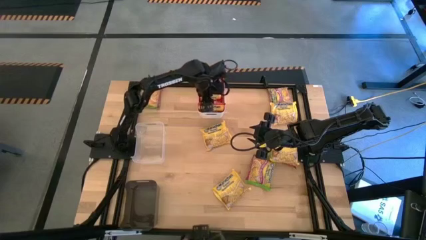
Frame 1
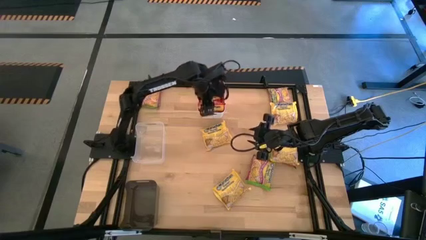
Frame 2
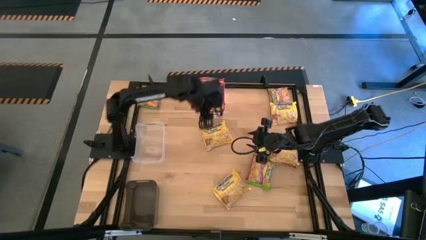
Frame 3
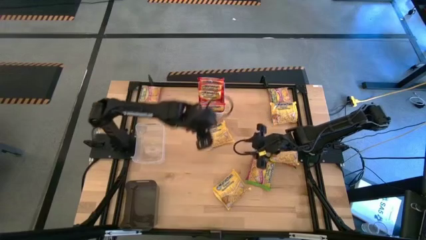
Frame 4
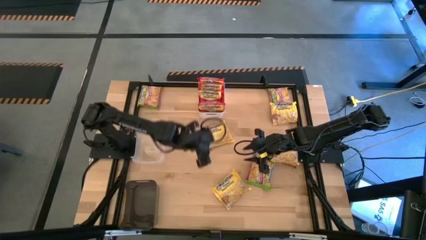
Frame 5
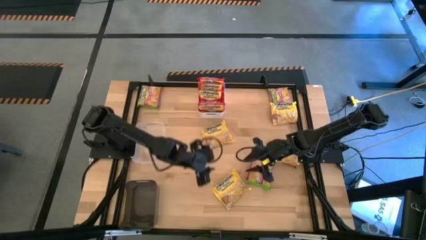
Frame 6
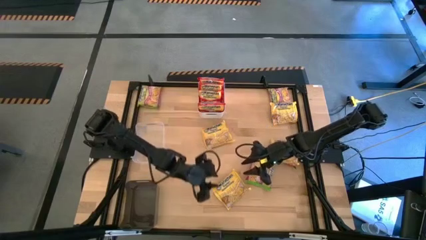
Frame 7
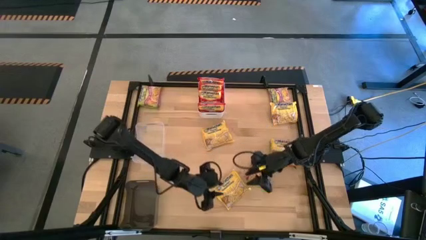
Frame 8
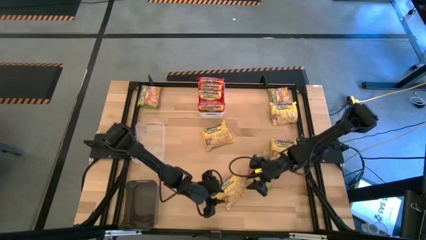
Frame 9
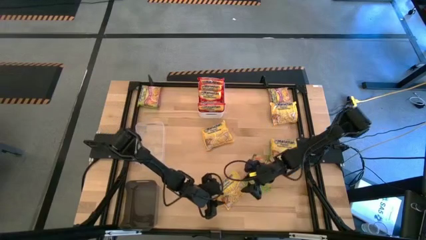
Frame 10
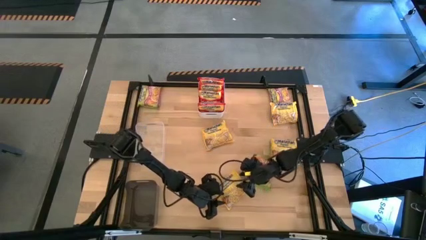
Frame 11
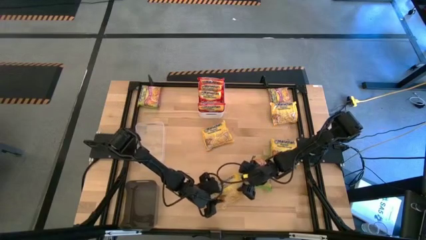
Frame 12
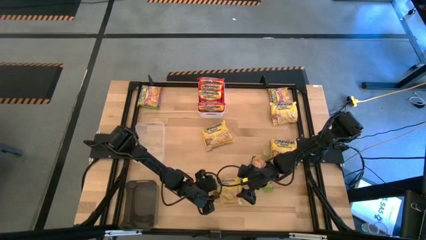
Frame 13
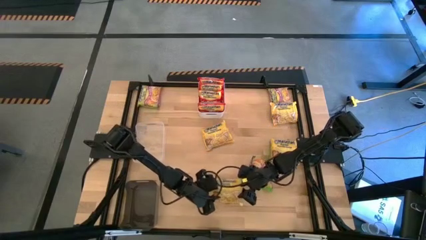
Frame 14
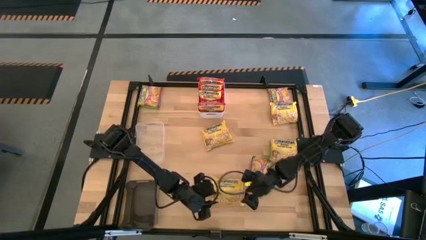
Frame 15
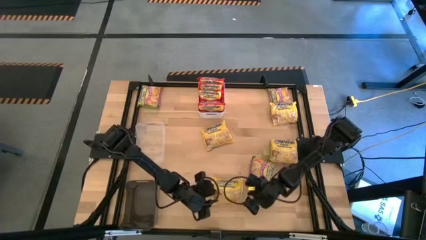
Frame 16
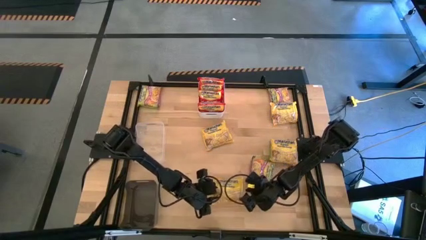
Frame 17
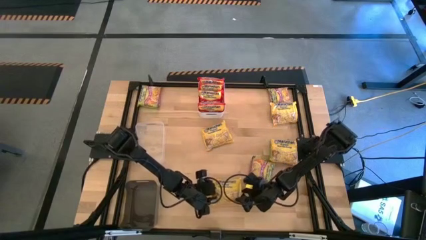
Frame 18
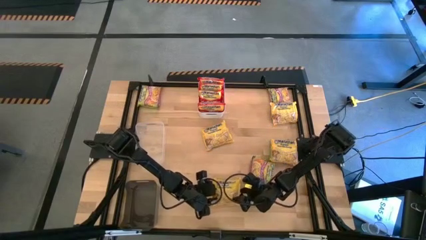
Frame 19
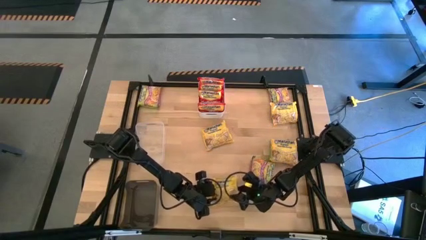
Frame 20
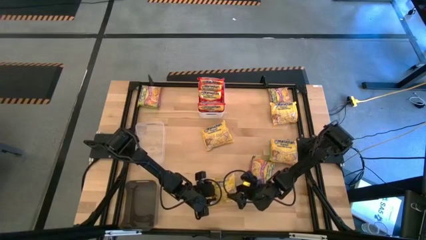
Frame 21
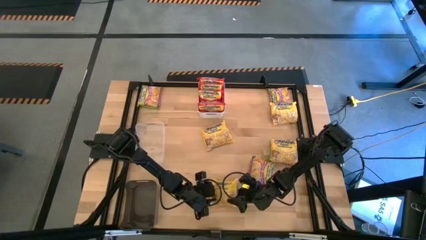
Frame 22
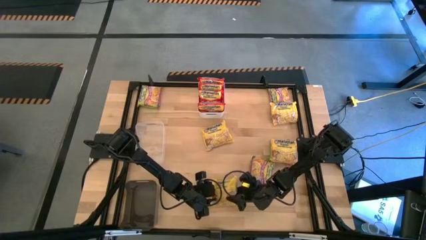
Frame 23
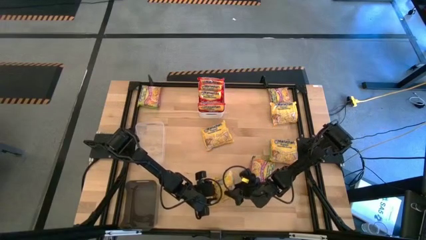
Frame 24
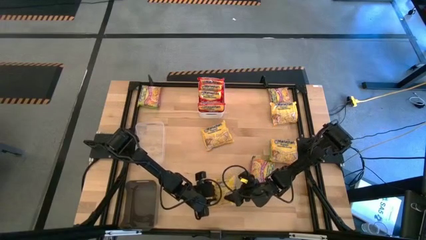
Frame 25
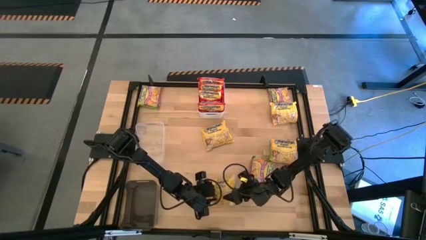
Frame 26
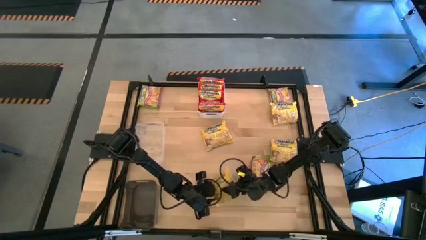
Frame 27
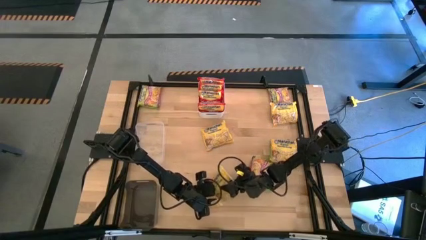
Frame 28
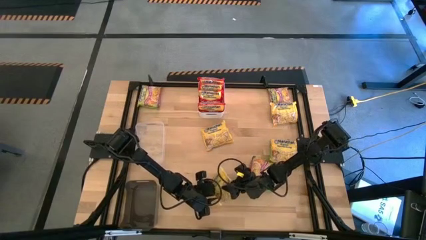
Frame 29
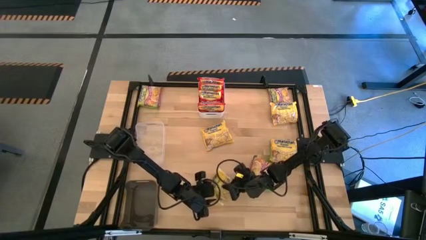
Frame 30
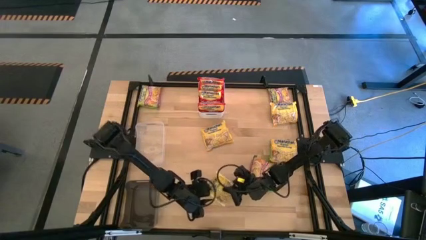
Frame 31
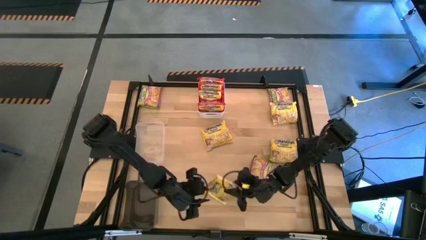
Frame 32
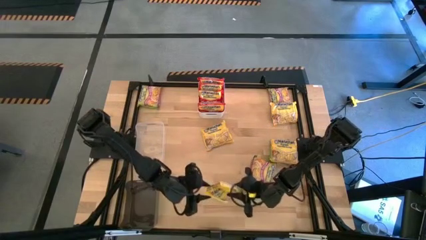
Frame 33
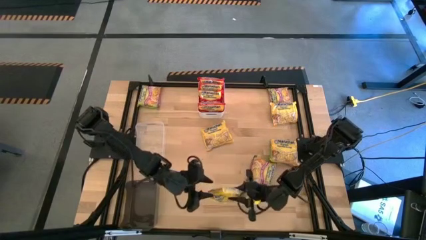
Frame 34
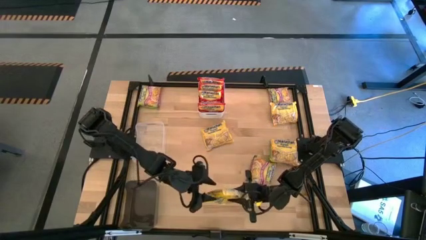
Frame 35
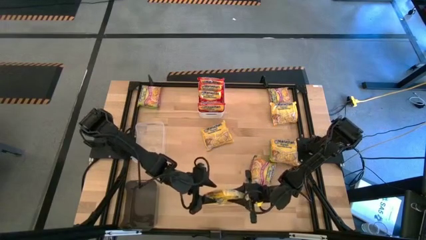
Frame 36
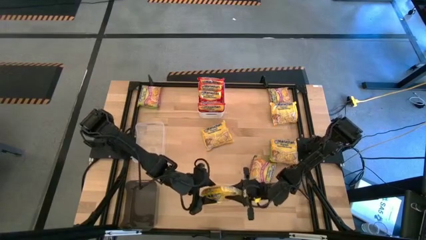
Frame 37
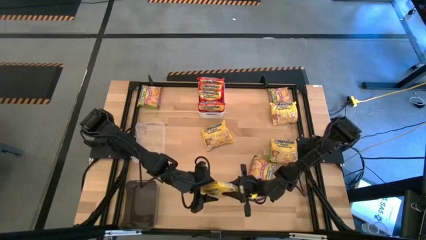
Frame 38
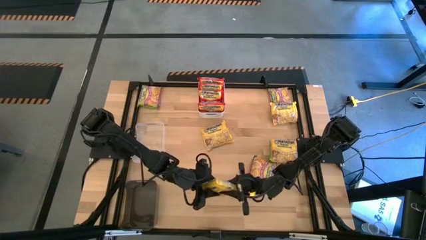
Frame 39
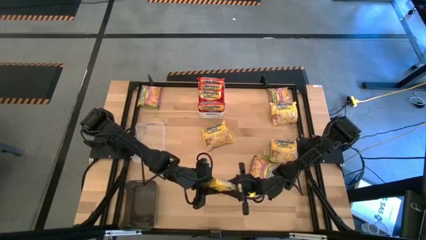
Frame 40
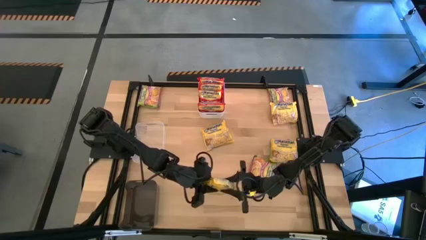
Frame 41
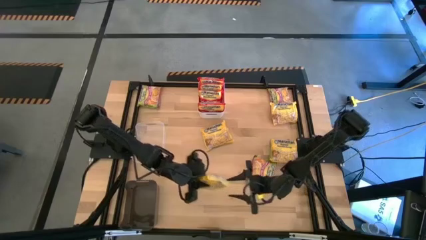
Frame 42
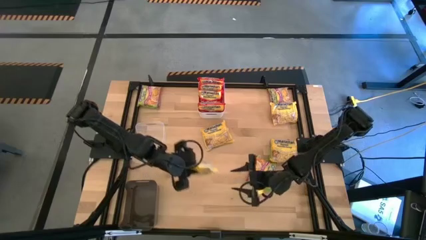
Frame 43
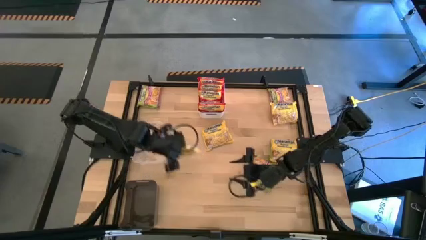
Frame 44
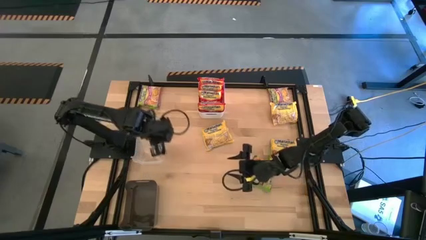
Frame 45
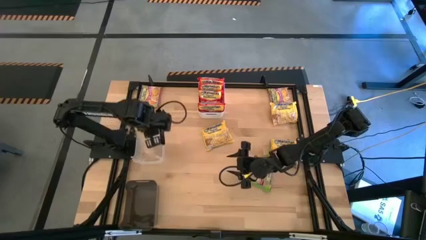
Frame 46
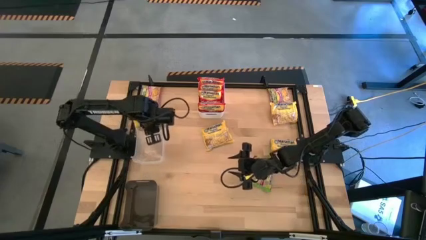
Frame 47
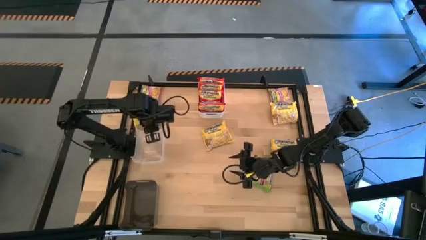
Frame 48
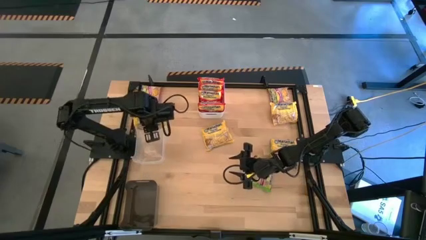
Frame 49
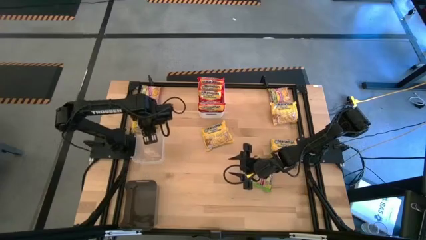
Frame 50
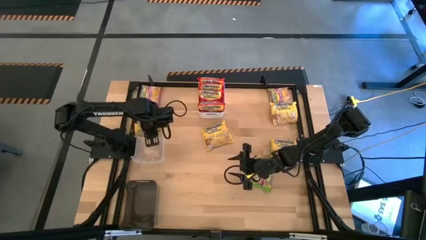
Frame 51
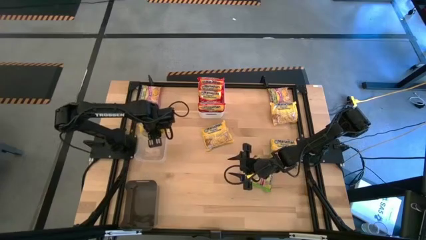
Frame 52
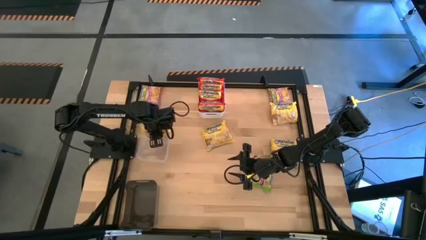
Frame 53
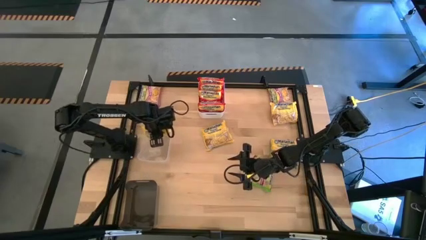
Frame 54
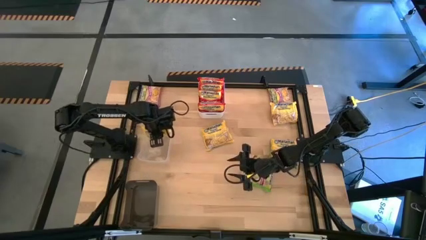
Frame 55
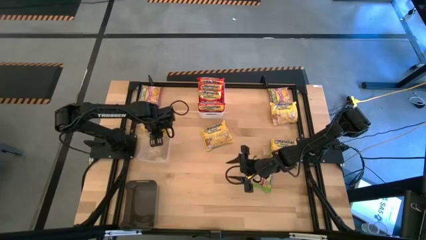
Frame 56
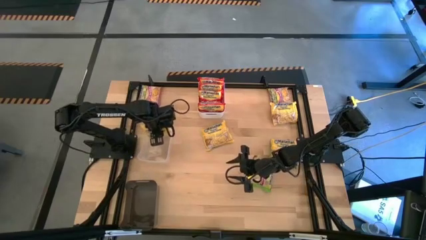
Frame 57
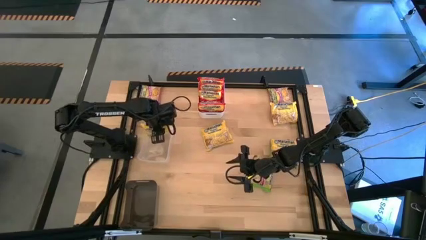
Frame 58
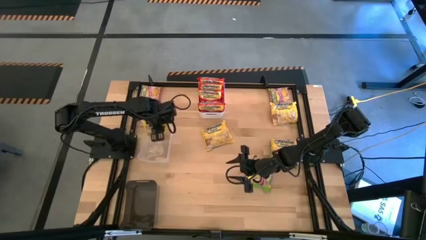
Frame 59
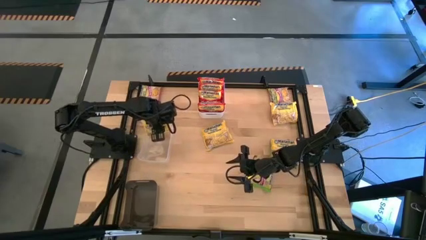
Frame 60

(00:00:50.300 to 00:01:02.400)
Task: Sort Maruchan noodles
Put the yellow noodle pack into the transparent bin

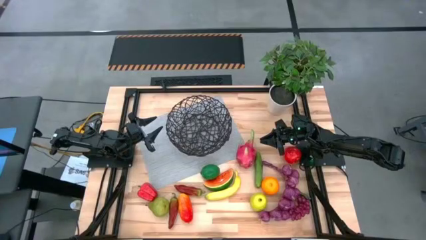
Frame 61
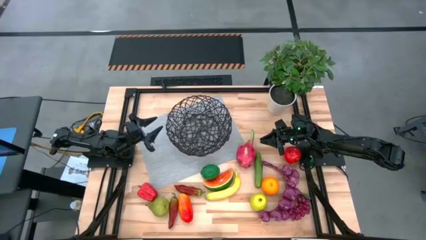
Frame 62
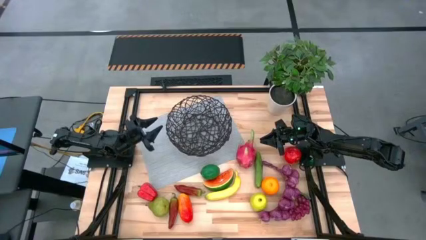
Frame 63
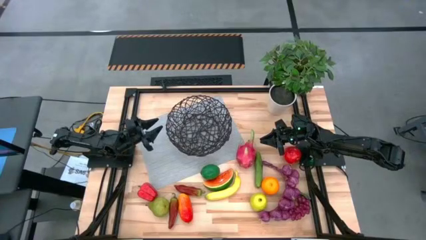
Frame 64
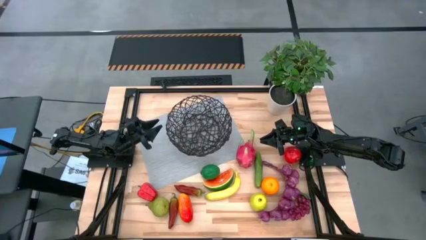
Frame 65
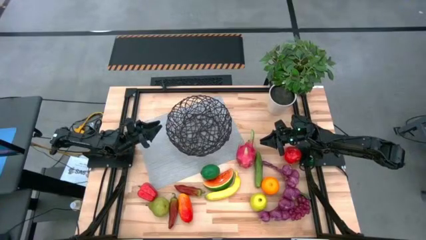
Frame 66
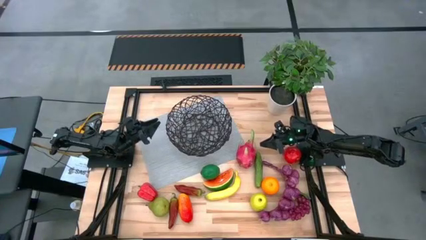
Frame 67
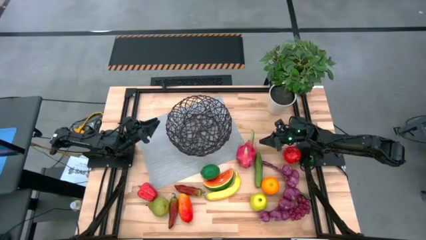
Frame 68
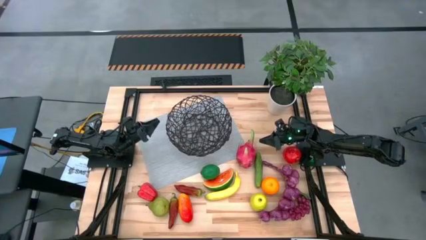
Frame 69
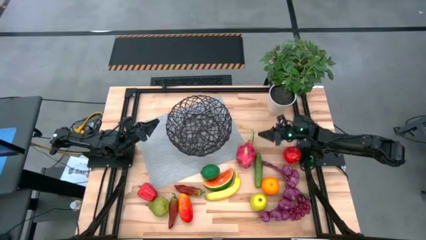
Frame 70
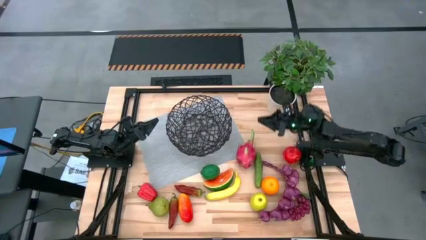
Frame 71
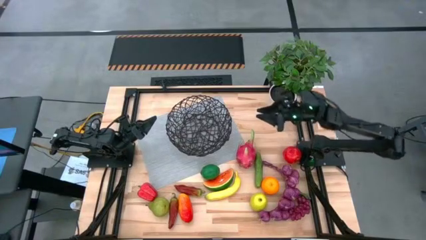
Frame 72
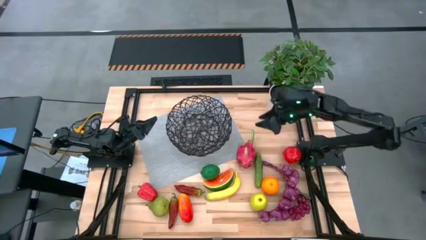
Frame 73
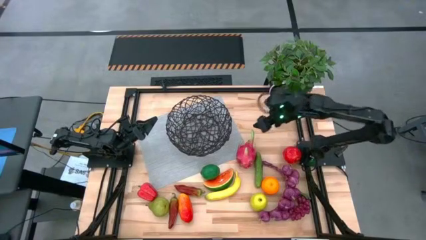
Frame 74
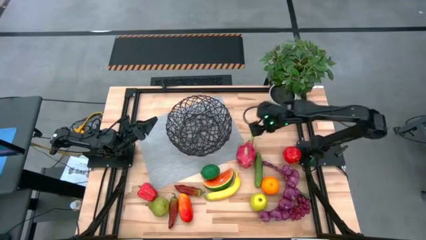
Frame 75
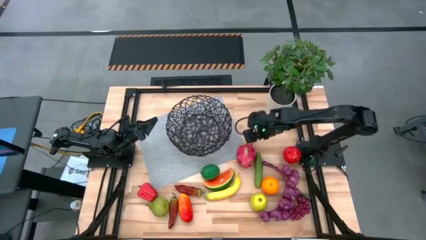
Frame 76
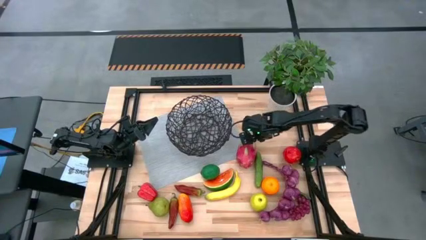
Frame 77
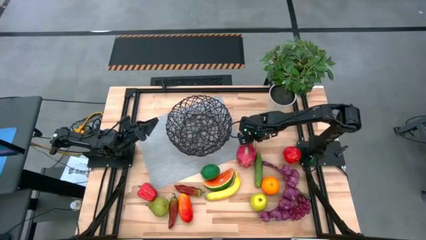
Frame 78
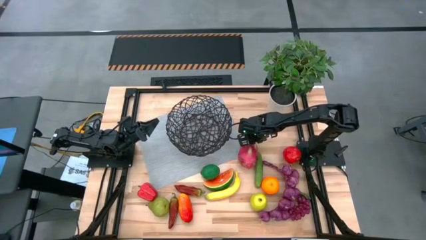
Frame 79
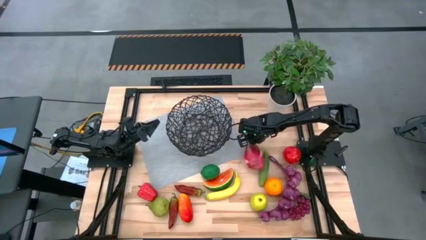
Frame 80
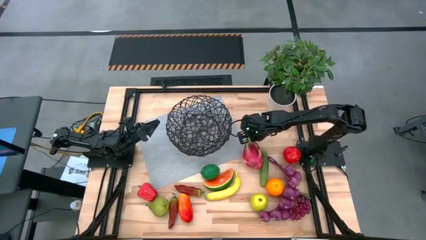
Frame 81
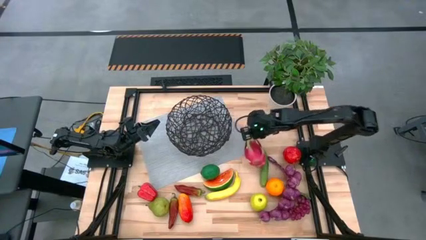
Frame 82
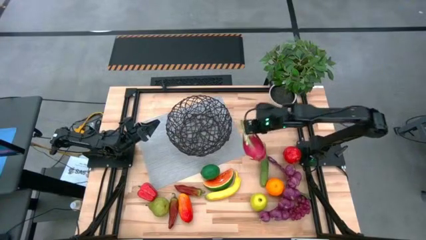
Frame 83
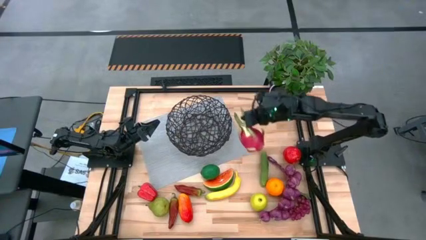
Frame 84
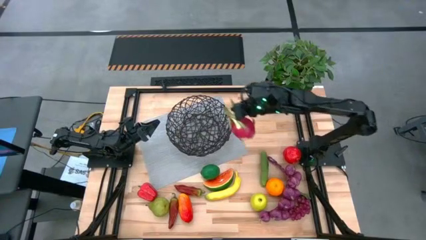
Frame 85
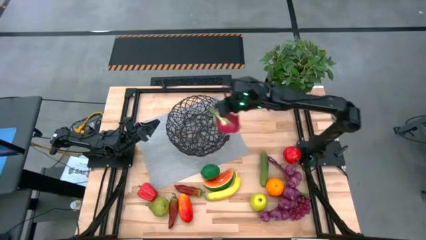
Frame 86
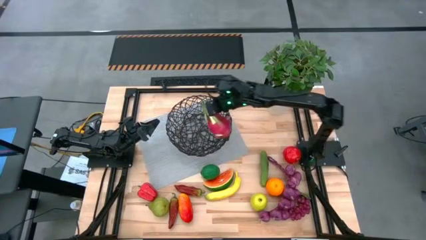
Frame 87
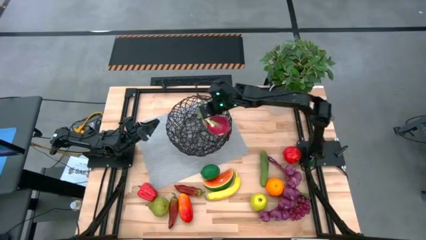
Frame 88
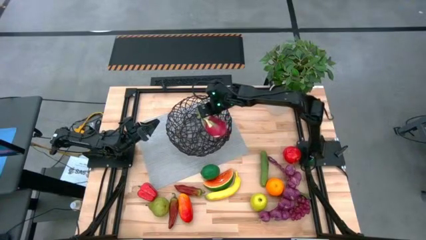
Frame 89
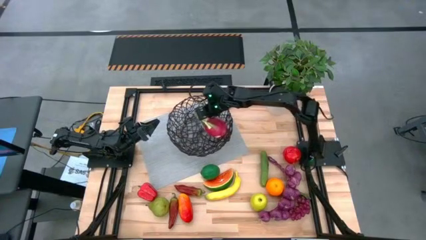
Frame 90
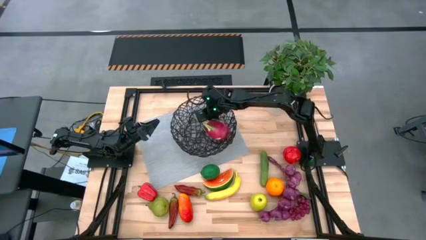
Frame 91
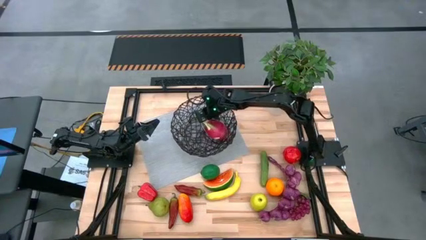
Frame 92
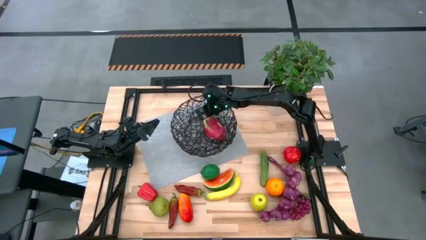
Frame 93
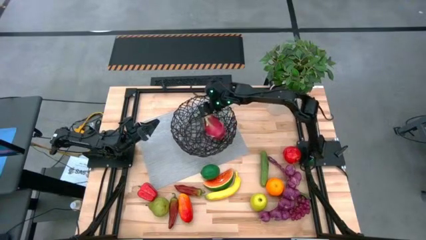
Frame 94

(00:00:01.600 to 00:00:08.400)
Task: Build produce basket
Put the dragon fruit into the wired basket
